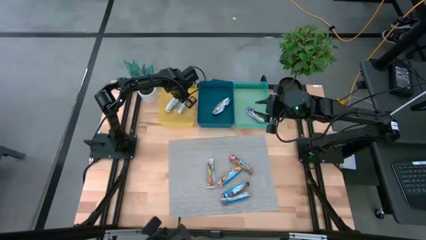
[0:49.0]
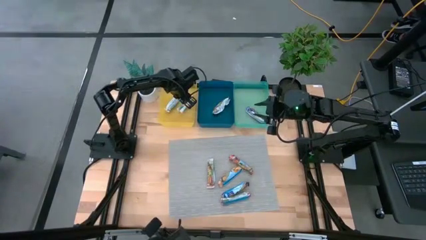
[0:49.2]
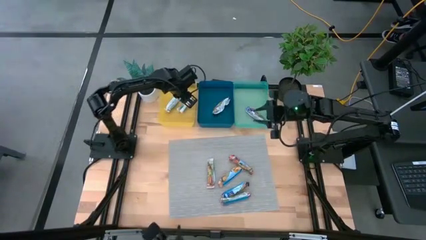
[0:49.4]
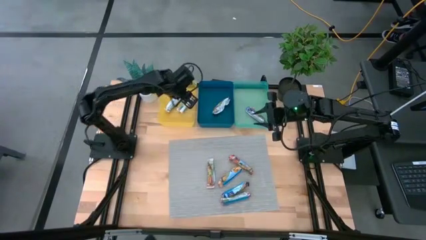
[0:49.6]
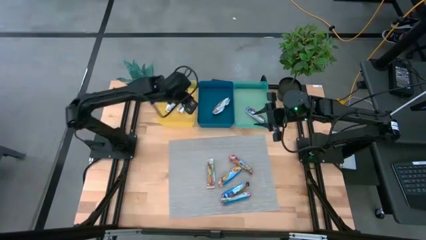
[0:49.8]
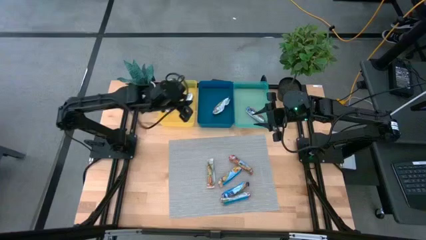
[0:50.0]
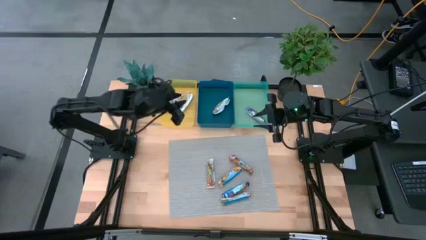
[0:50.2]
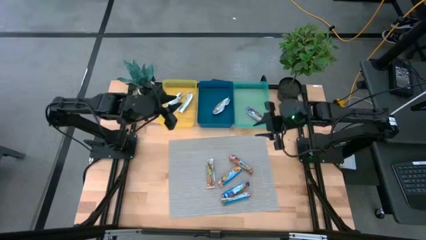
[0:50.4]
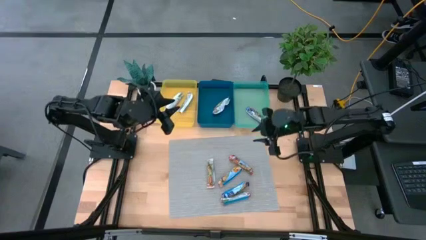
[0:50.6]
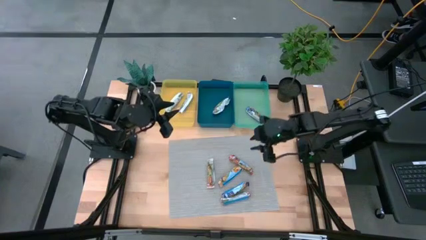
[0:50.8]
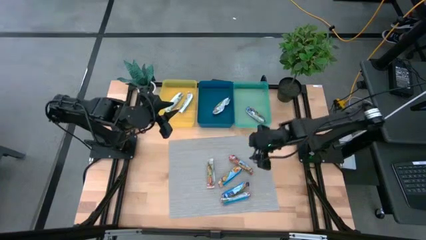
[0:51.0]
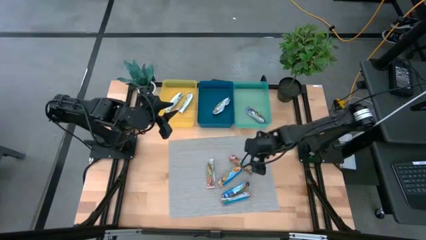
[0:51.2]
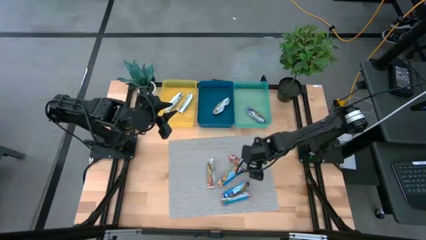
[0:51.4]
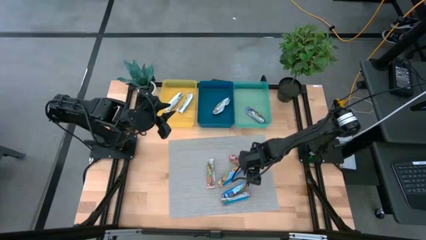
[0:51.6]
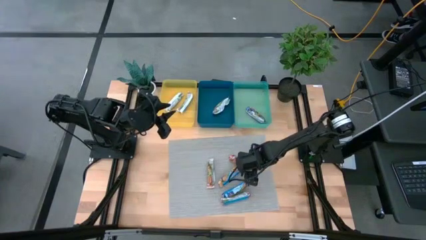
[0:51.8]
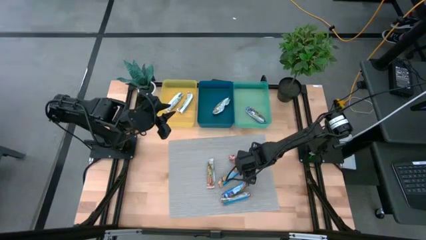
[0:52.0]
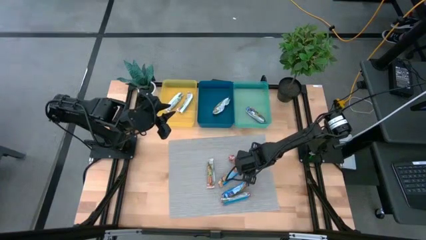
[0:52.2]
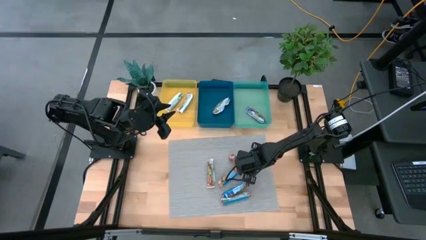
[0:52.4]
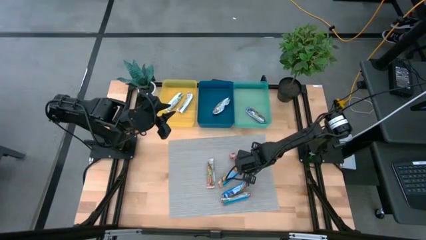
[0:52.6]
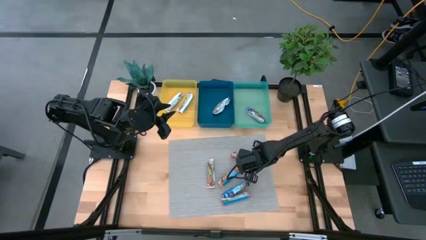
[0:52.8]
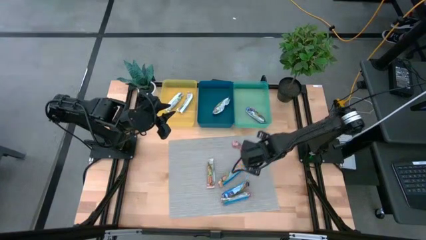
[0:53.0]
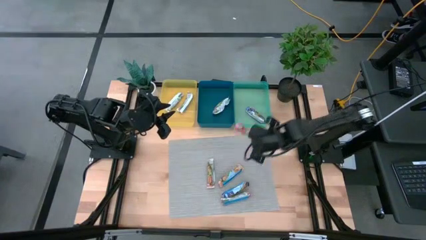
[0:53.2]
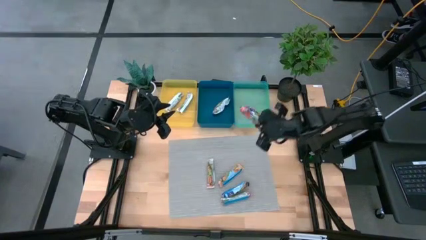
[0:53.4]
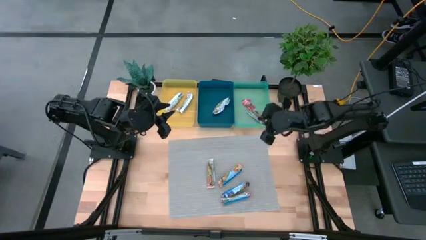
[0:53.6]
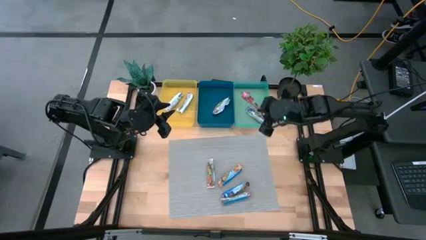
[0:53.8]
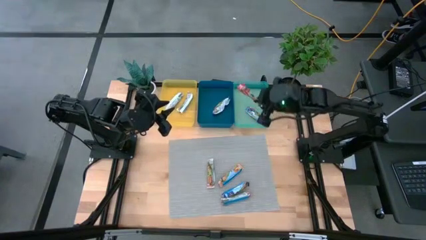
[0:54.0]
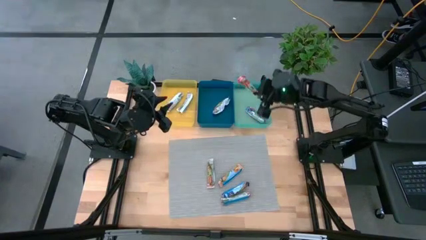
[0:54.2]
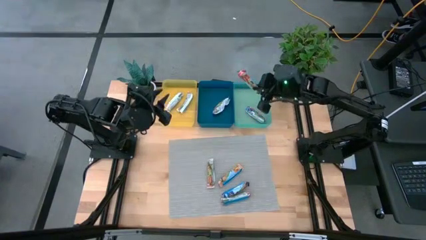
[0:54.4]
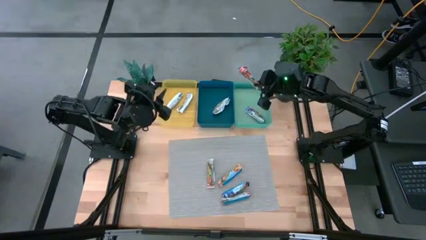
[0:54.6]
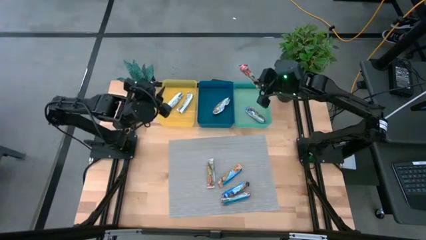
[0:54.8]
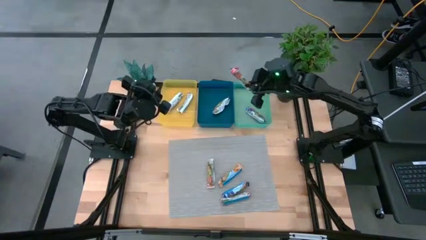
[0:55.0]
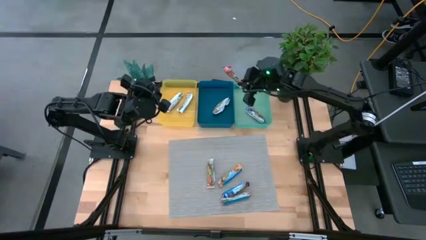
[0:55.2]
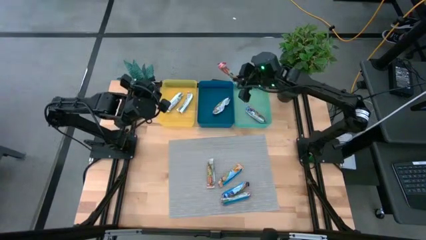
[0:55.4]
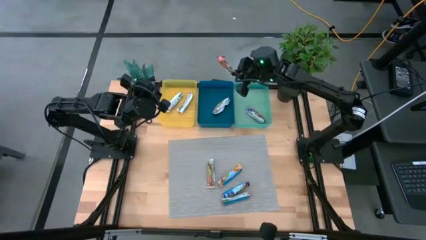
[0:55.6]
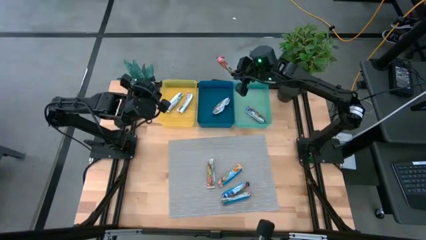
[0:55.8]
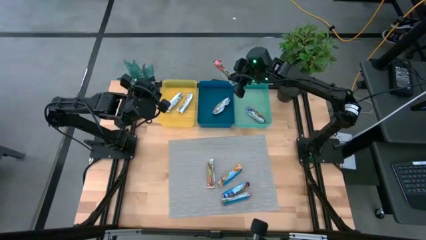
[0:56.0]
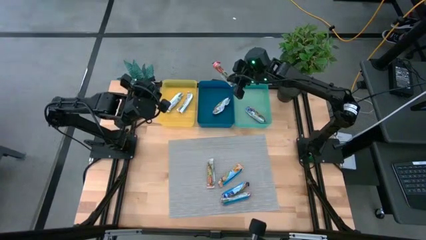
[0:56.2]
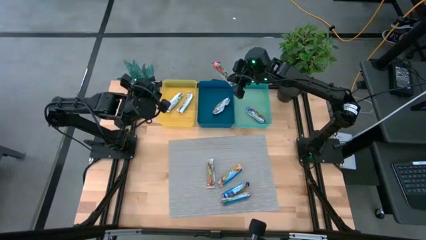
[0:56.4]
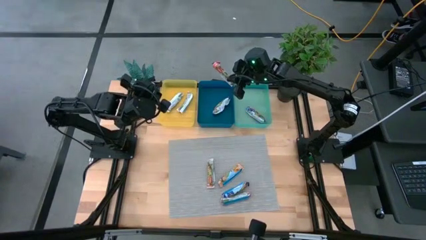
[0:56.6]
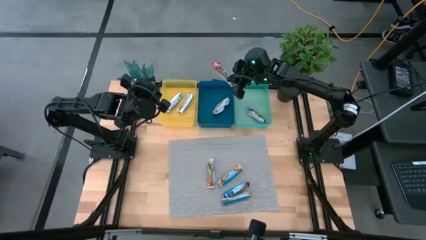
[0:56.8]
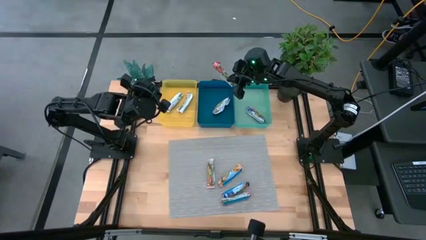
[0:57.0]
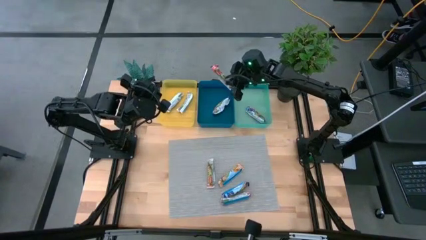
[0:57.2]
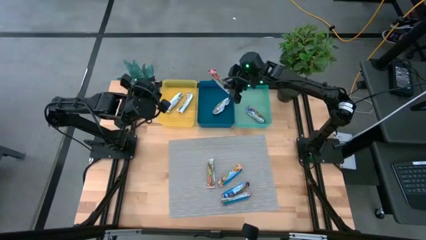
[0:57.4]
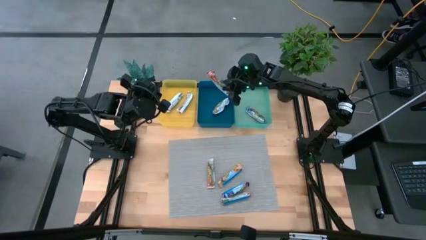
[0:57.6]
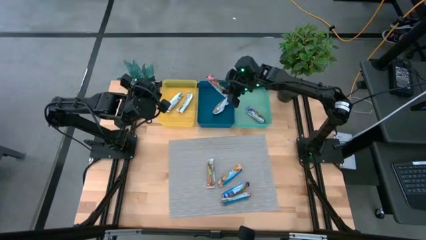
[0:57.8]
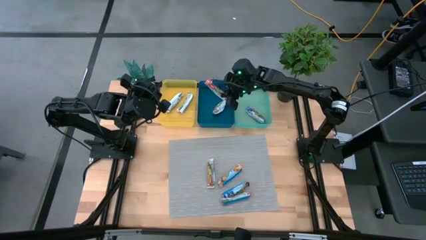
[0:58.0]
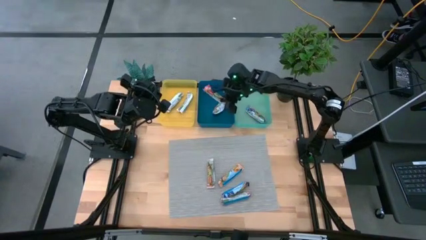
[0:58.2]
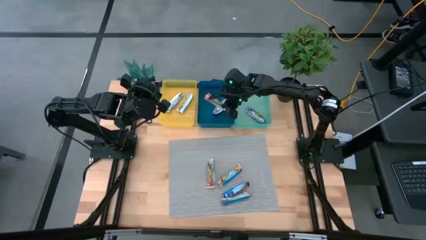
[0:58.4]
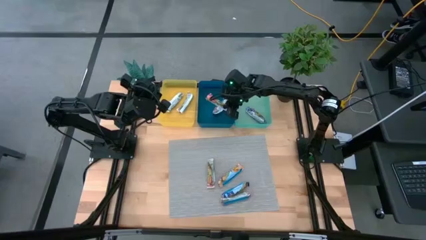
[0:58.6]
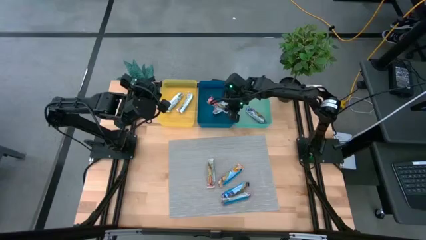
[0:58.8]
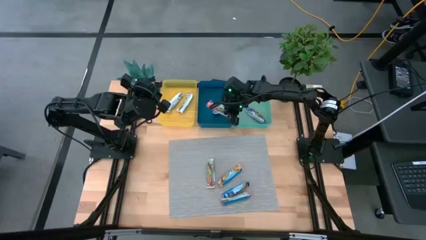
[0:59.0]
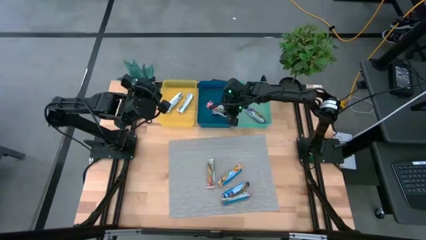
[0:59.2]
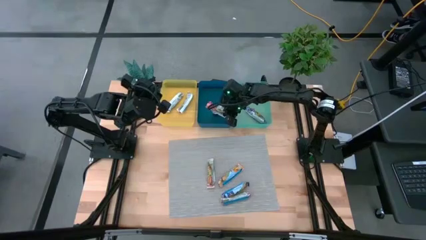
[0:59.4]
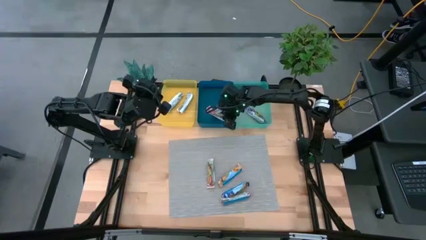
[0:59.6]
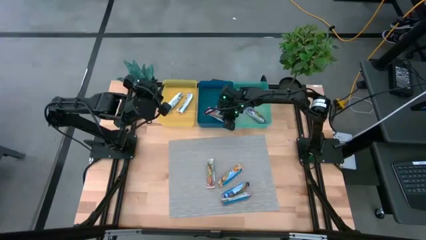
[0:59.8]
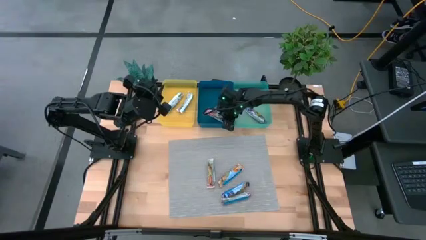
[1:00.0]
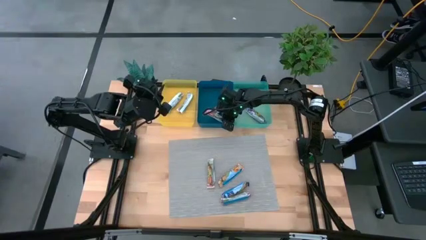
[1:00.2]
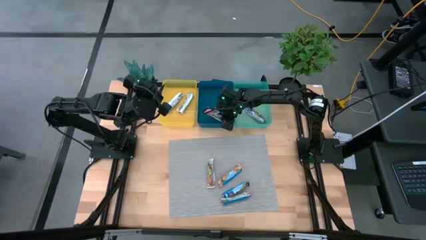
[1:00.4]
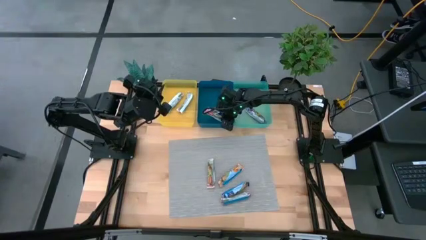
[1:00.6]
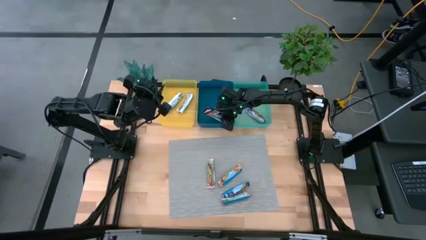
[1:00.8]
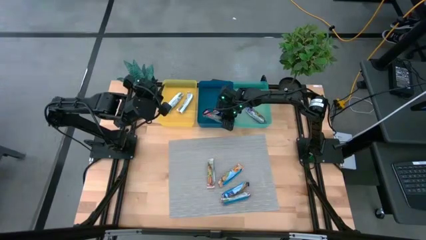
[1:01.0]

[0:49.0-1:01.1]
Task: Pick and place Granola Bars by type
Put the red granola bar into the blue bin
